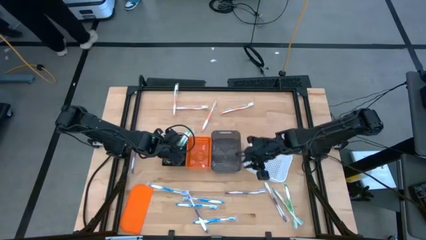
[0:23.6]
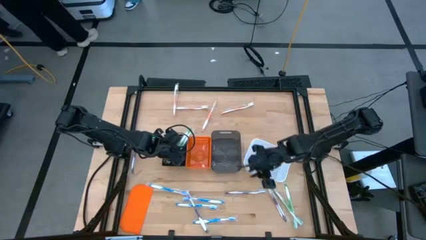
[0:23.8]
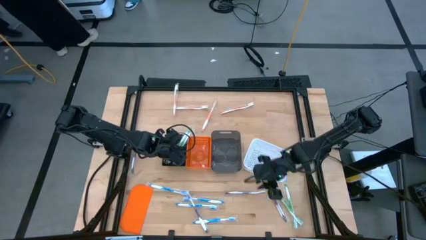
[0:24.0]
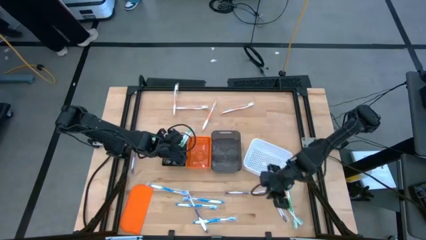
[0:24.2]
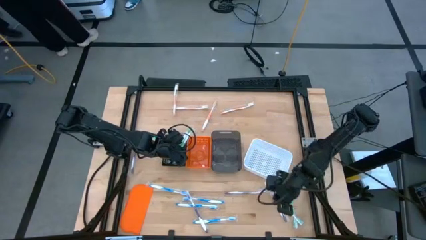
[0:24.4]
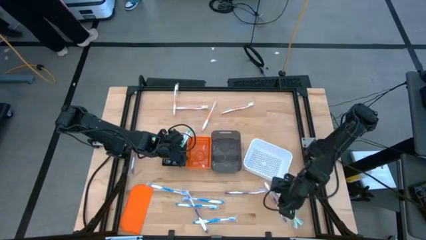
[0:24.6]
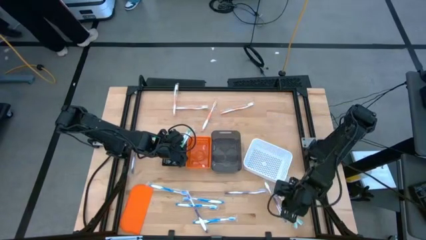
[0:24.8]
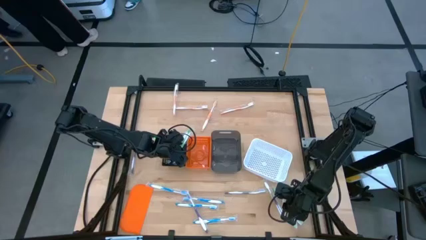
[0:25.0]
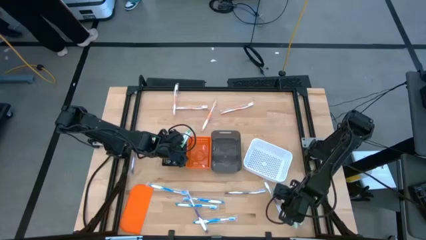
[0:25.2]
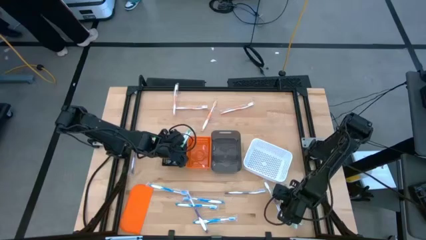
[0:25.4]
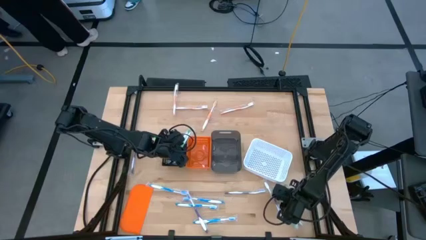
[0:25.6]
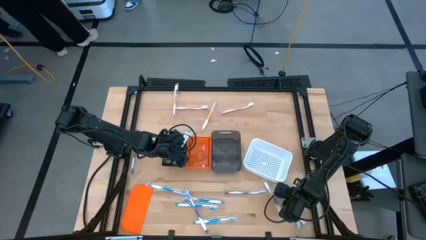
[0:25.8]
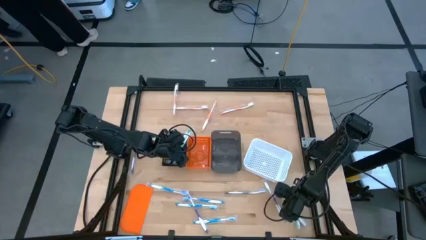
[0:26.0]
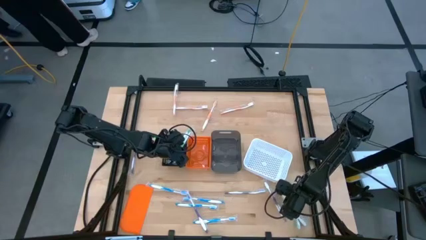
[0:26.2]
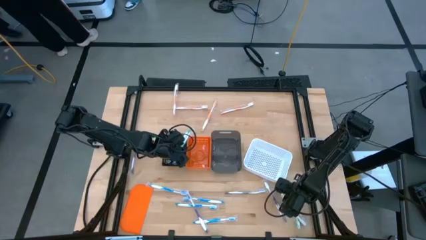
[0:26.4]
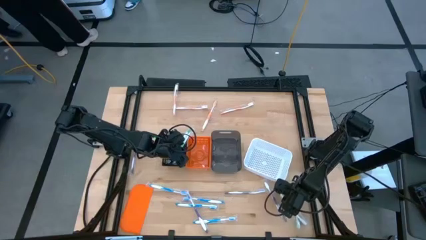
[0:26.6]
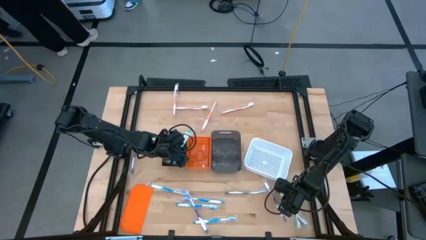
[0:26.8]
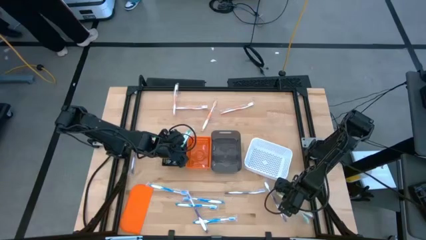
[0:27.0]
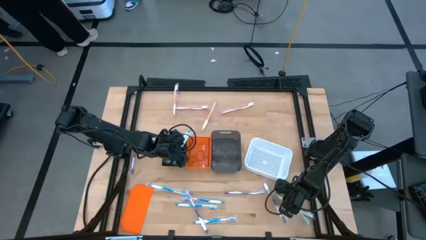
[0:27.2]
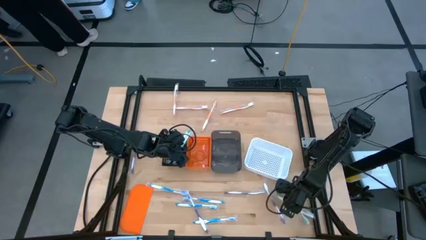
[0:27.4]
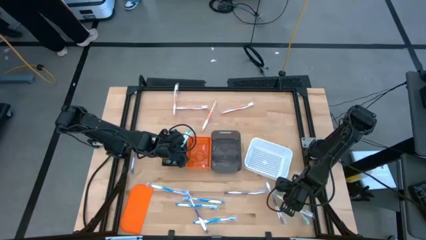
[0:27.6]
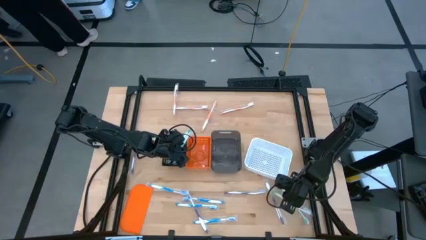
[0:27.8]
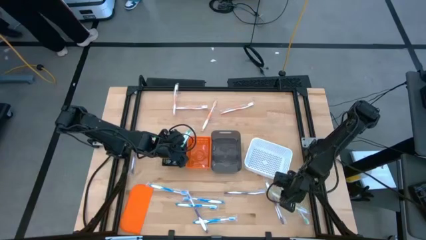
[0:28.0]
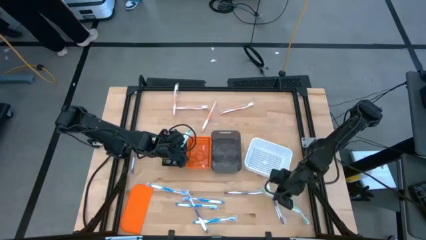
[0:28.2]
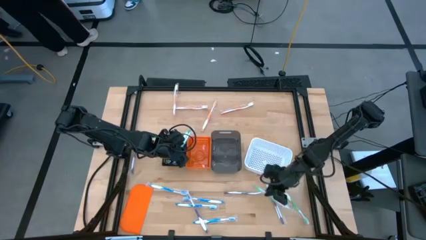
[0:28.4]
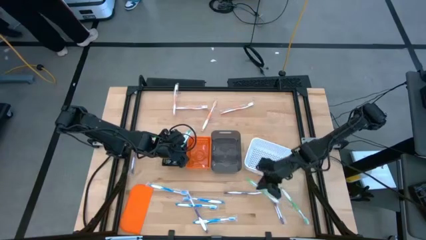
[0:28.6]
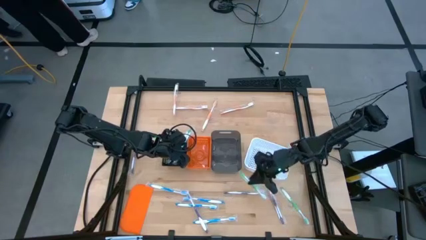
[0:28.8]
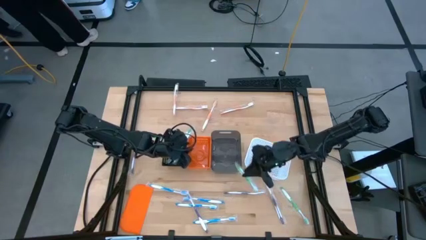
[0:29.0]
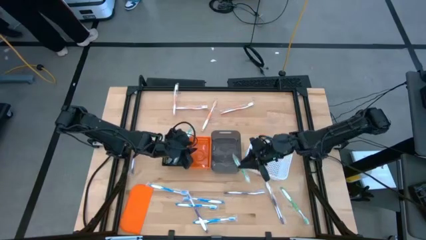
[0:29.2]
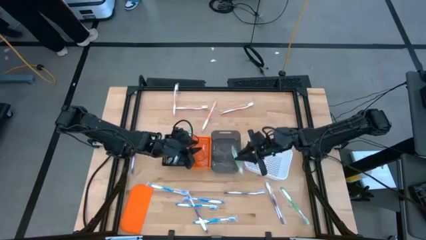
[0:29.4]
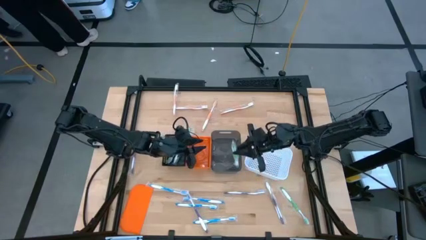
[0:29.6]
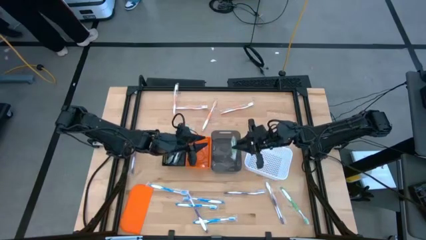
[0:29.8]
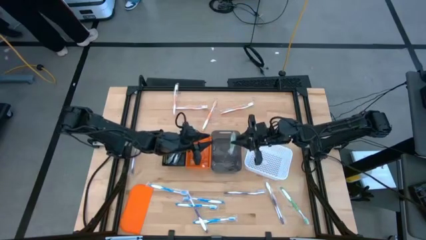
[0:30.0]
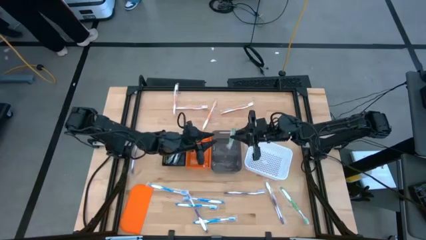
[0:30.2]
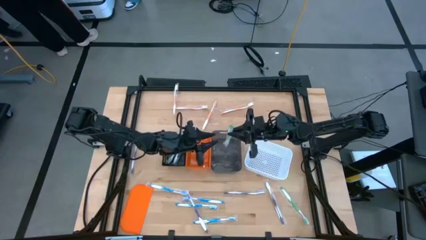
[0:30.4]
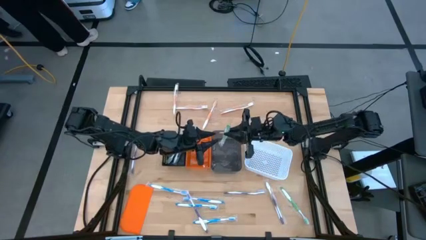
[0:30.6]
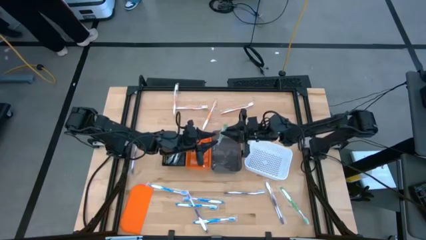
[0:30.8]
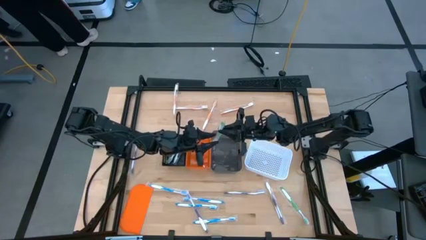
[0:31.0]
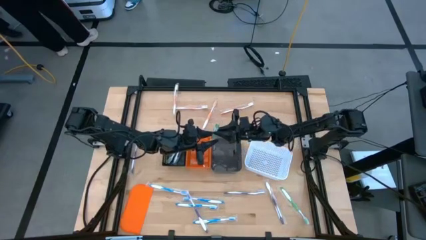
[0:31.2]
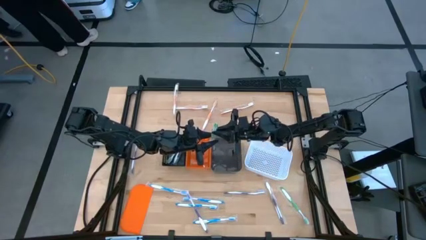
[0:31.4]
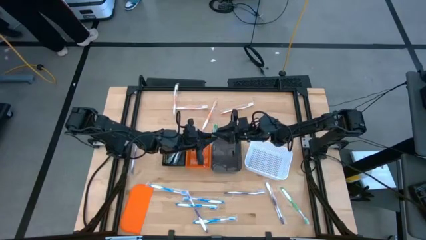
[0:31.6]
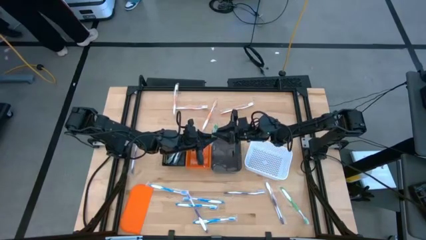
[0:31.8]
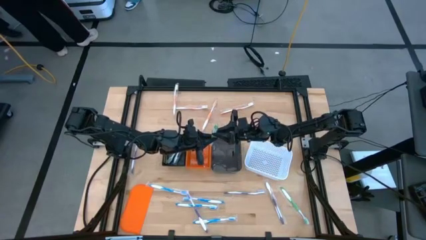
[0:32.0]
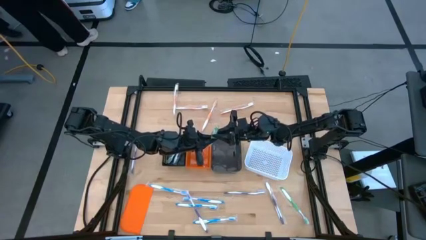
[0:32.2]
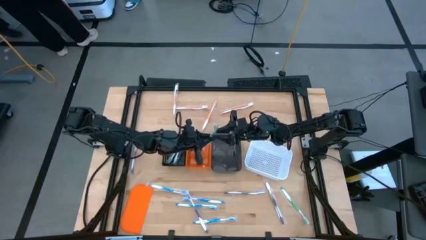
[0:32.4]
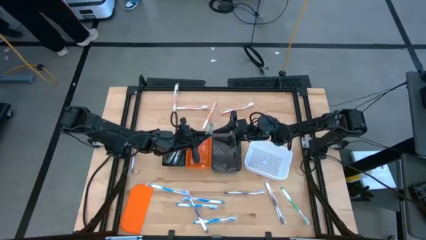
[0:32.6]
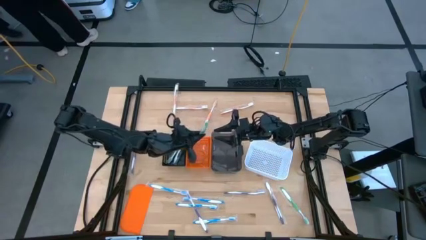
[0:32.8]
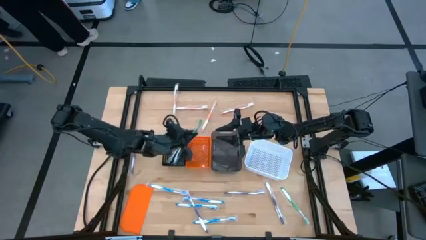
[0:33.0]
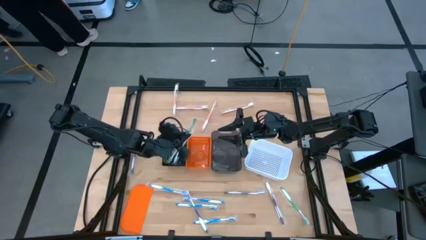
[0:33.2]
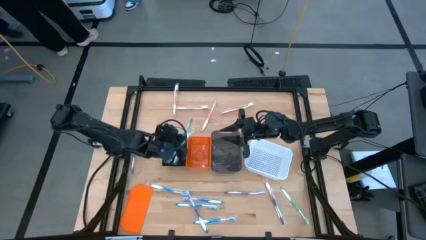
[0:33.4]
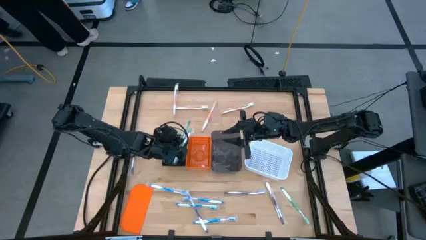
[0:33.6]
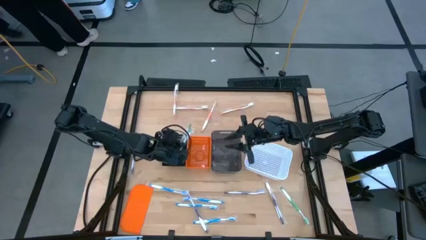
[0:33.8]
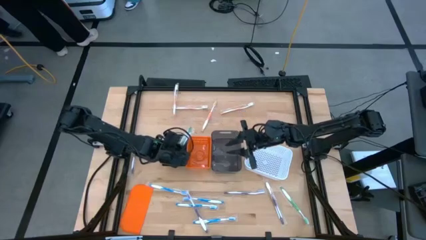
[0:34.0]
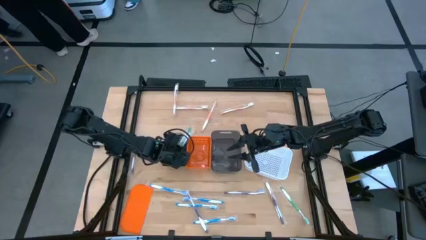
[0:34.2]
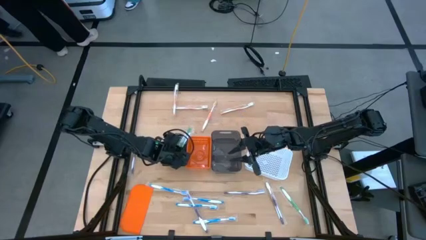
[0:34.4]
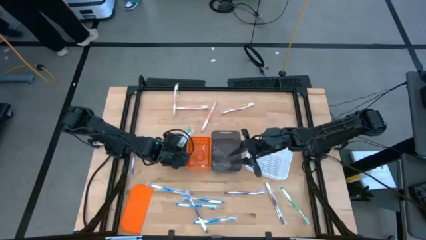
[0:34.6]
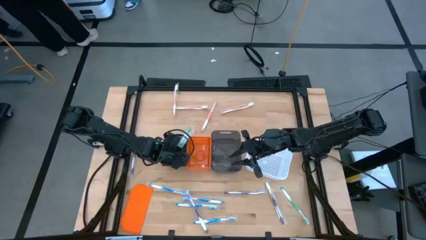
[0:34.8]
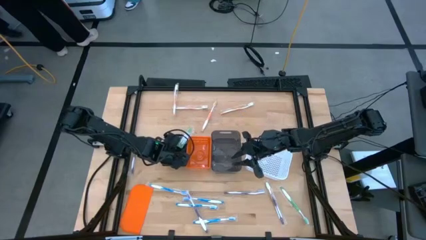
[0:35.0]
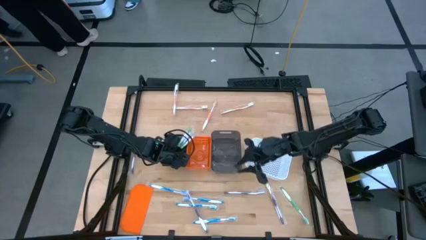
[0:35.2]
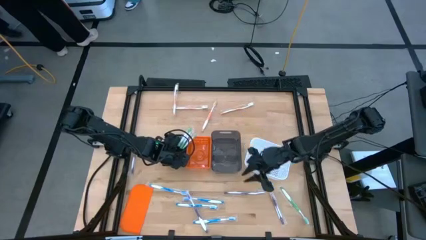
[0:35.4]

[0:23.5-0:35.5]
Task: Pick & Place Toothbrushes
Put the green toothbrush into the black bin

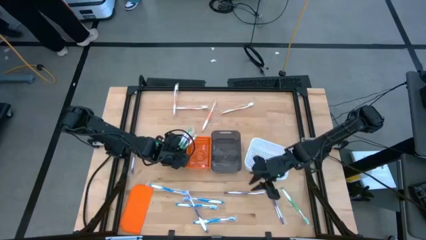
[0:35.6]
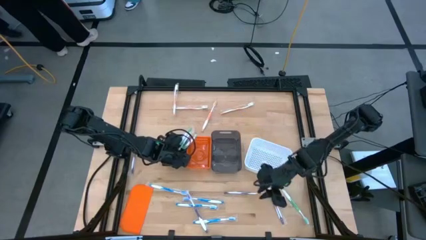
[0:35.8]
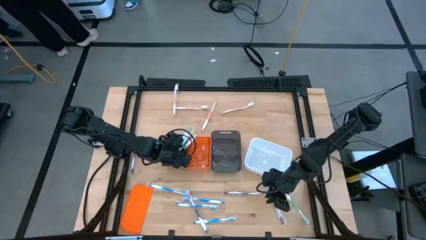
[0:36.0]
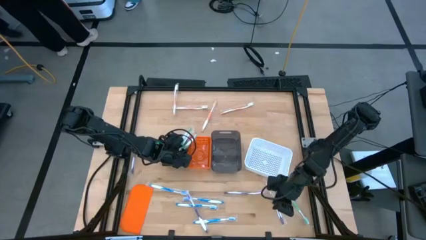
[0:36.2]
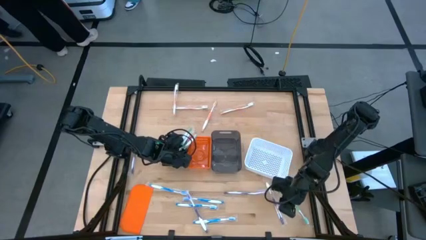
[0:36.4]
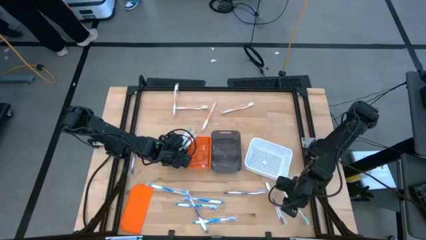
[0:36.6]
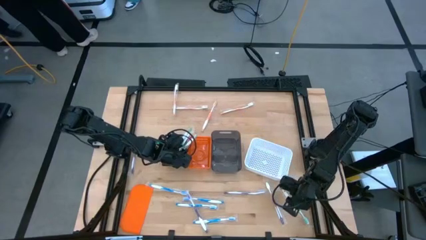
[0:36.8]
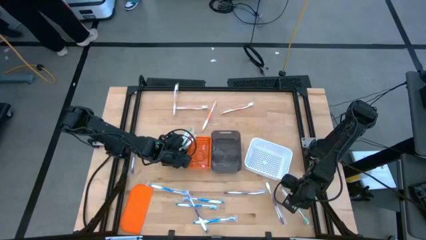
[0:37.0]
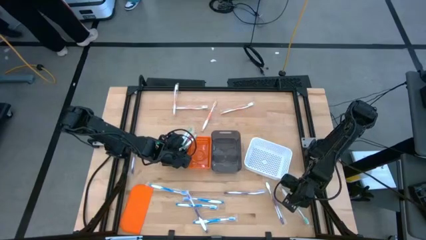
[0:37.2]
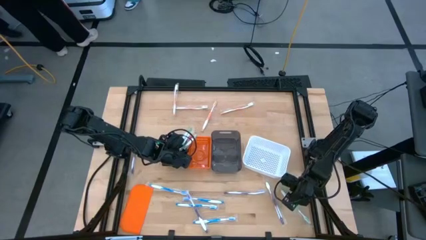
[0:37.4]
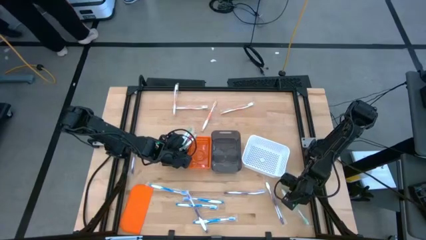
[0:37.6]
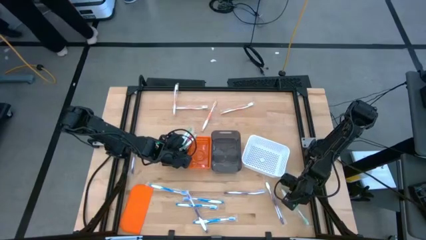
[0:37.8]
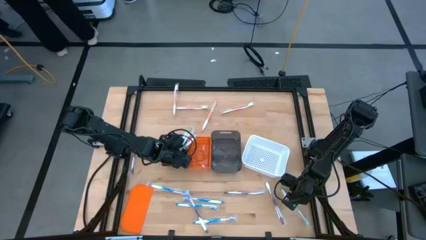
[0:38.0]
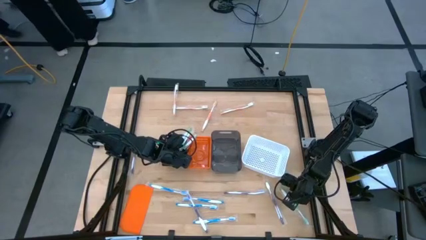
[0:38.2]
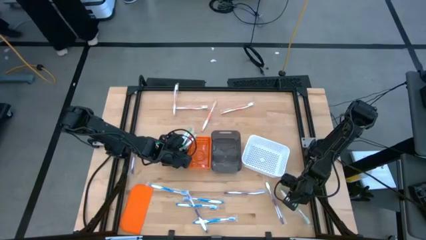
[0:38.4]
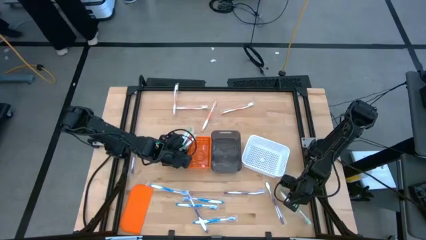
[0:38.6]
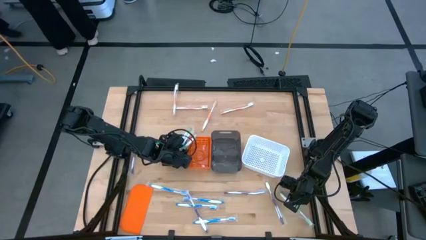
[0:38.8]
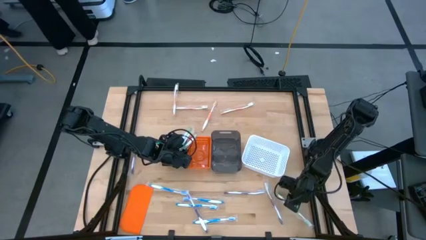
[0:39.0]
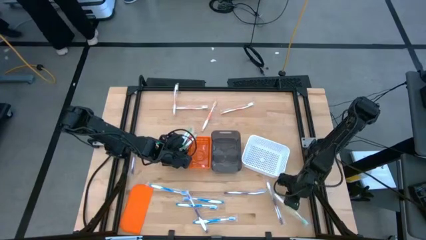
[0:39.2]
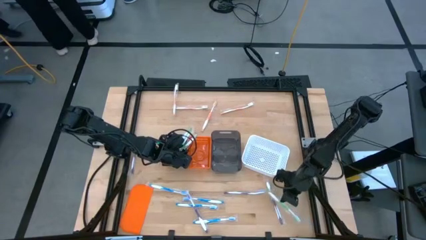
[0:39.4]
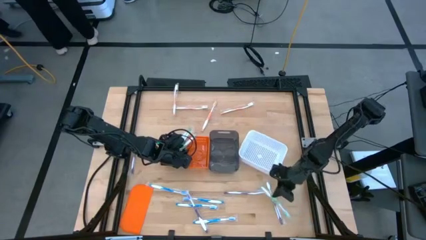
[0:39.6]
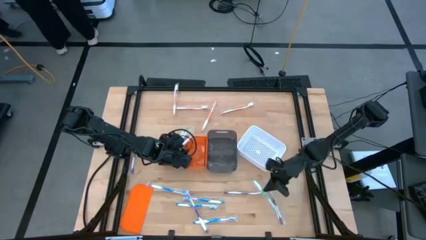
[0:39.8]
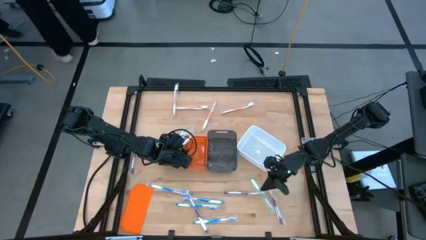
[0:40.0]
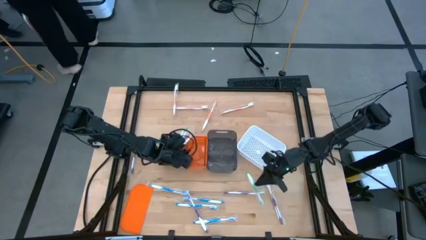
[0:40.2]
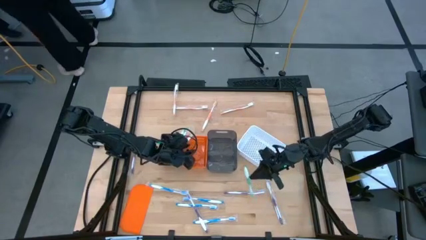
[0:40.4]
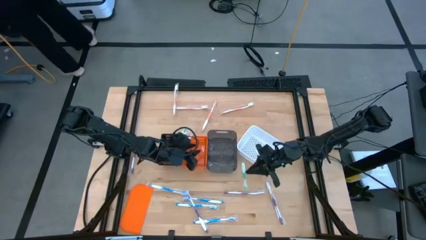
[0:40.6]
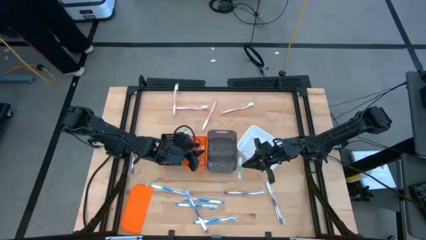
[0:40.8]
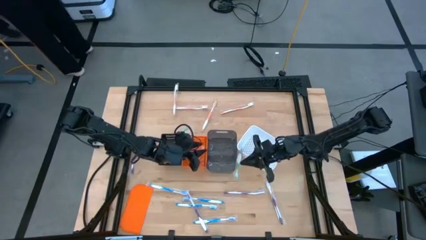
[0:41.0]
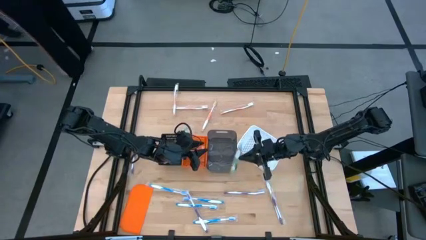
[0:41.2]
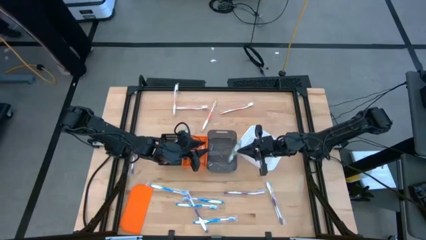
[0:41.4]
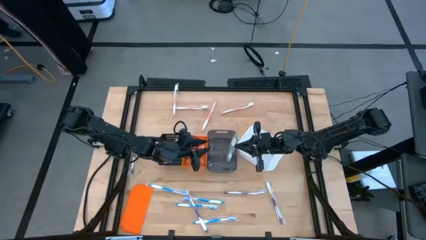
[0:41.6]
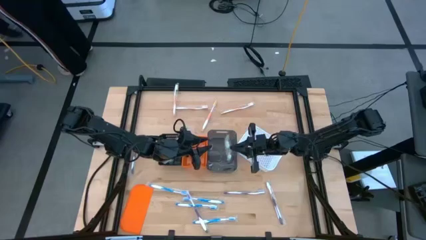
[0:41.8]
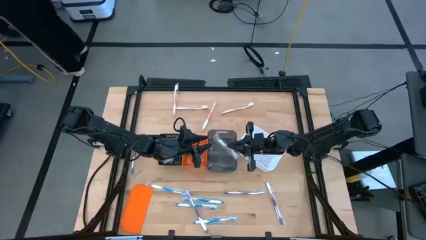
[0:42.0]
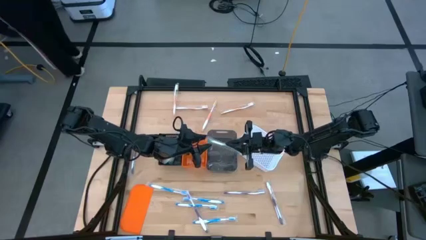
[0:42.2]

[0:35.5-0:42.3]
Put the green toothbrush into the black bin
